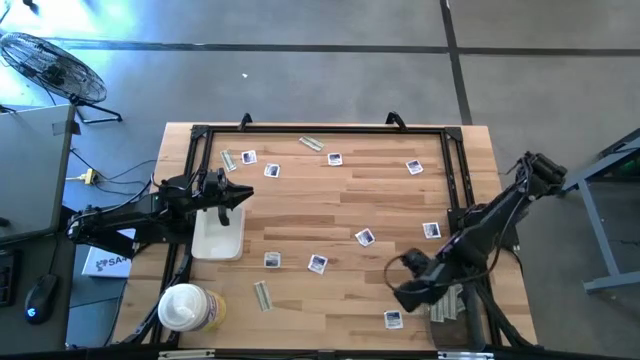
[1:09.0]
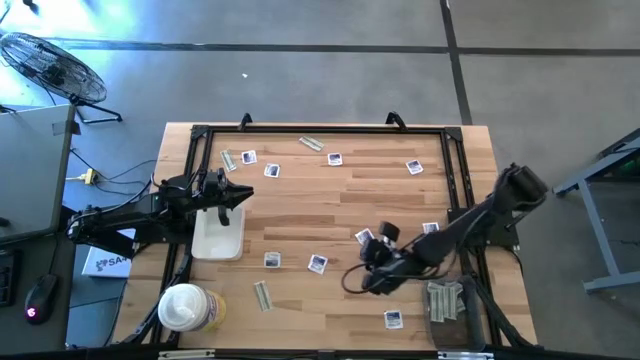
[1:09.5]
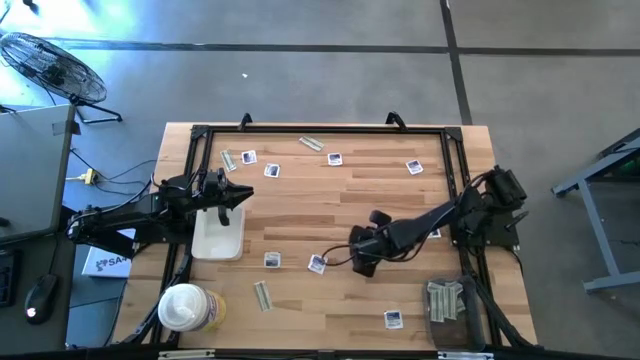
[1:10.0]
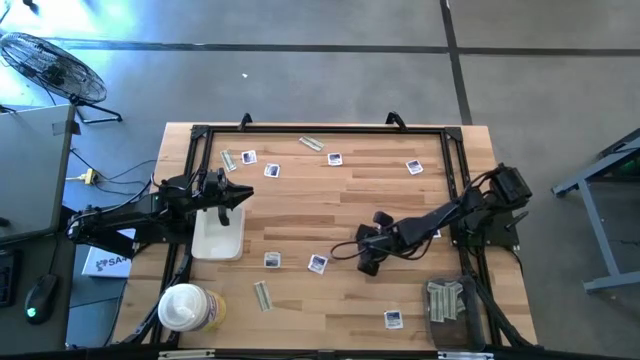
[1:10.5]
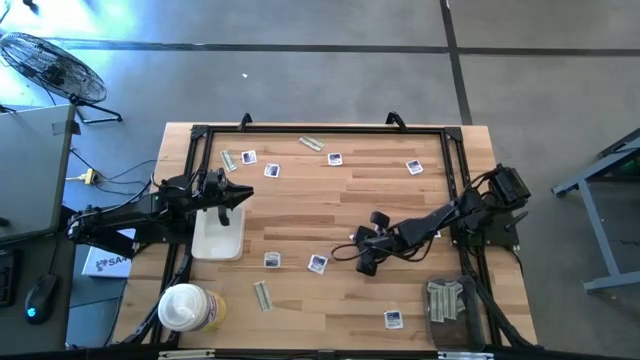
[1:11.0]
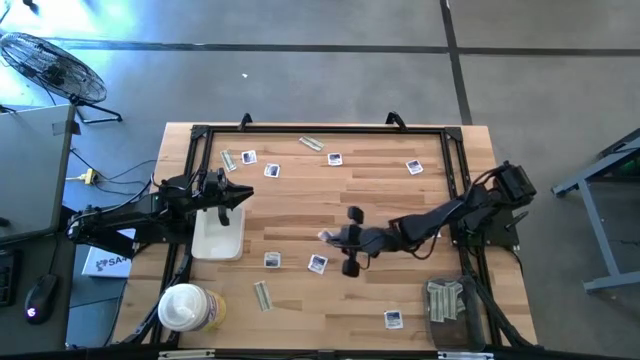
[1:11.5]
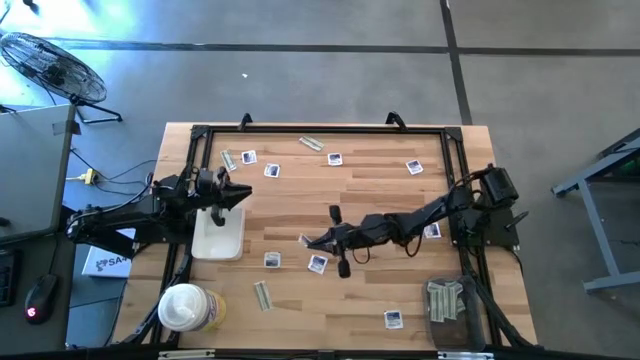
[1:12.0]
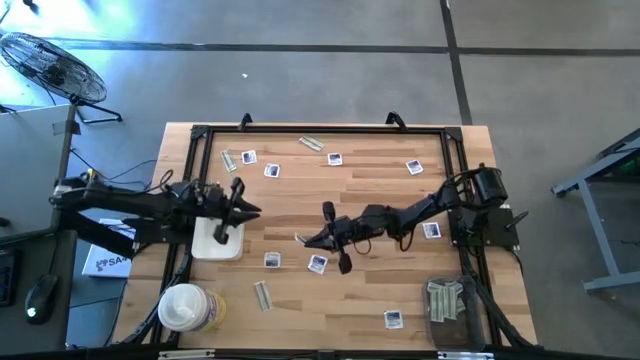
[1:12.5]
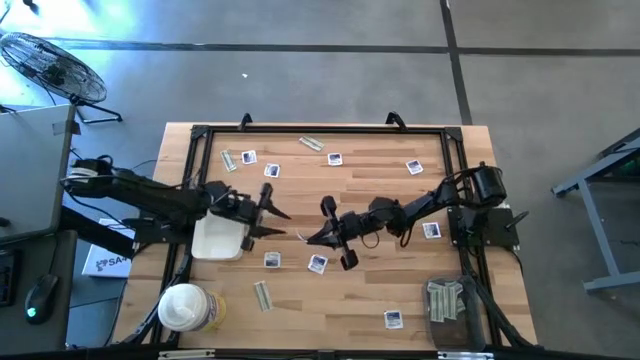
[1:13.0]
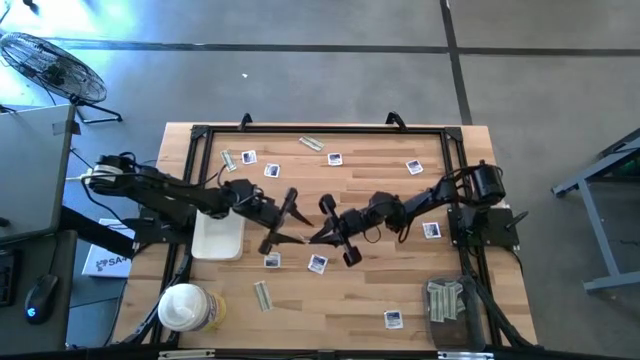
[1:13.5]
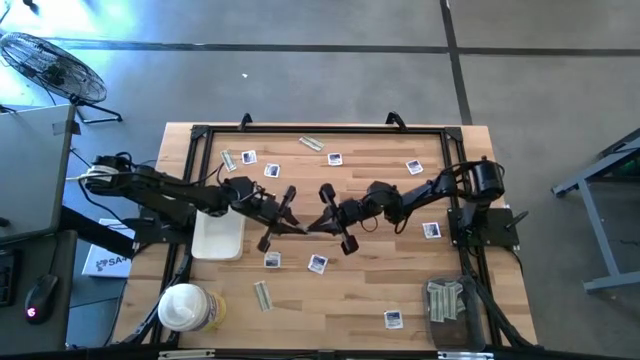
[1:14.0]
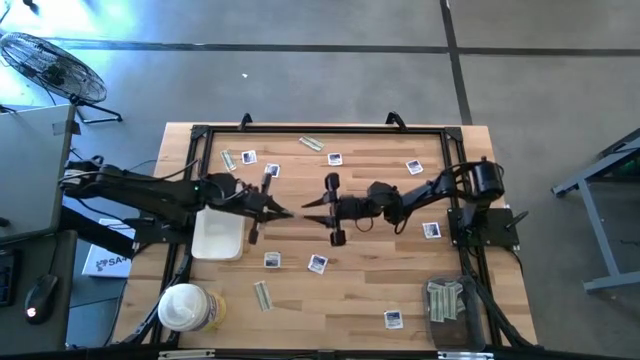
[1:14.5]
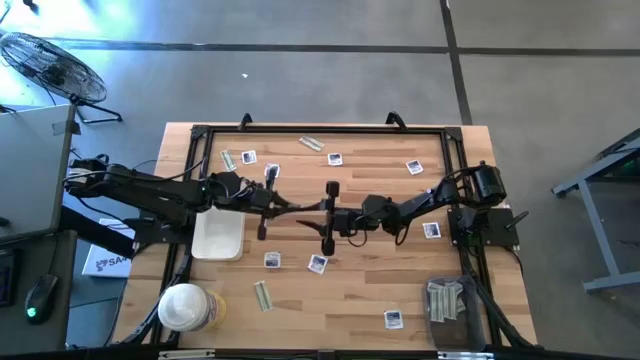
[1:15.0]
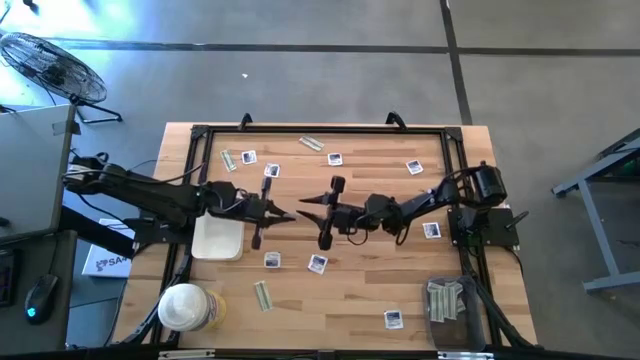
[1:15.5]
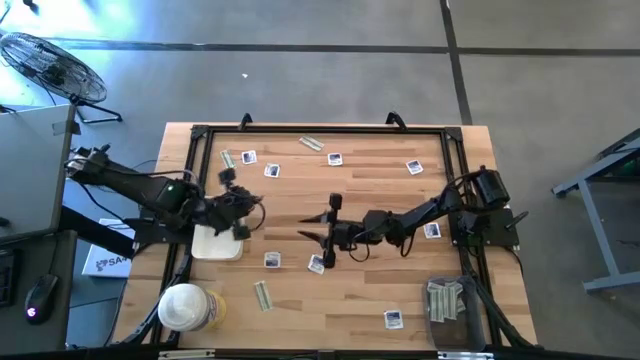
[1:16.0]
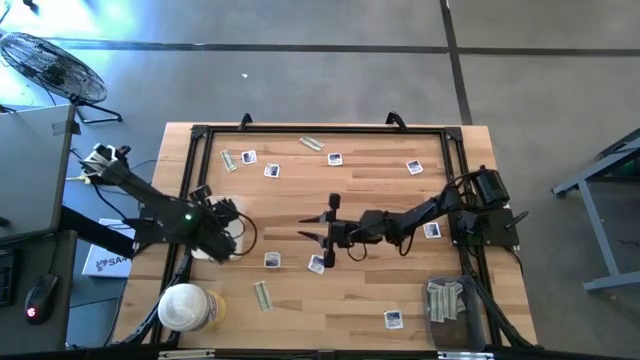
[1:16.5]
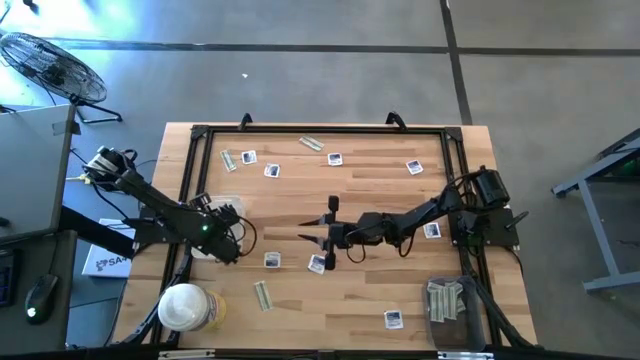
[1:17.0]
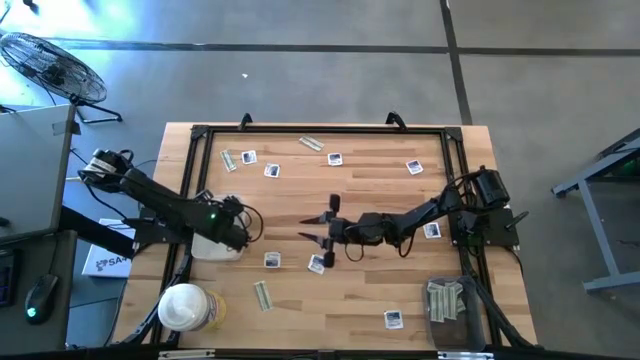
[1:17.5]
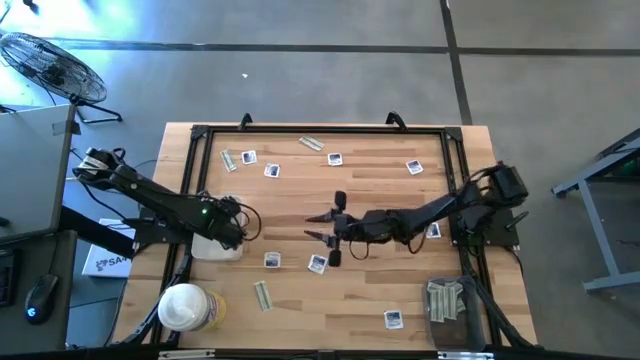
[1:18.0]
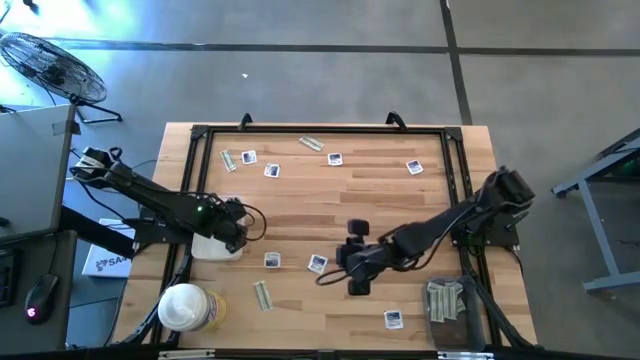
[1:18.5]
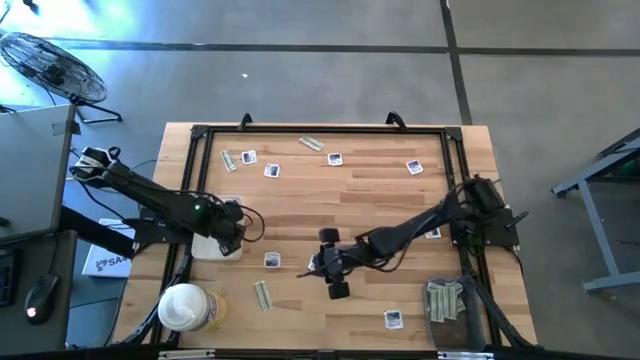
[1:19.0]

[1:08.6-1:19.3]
Task: Pick & Place First Aid Supplies
Put the blue alcohol pad into the white bin

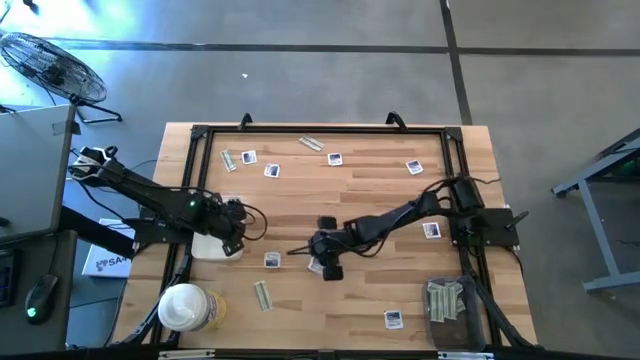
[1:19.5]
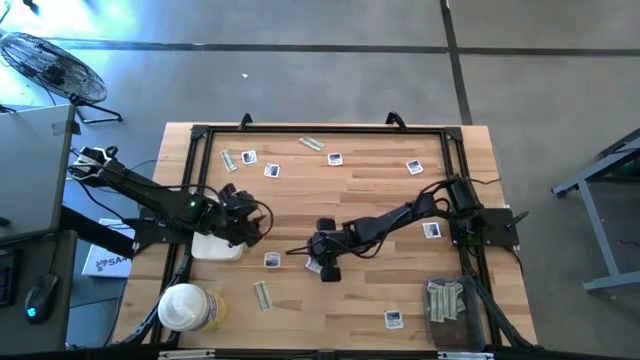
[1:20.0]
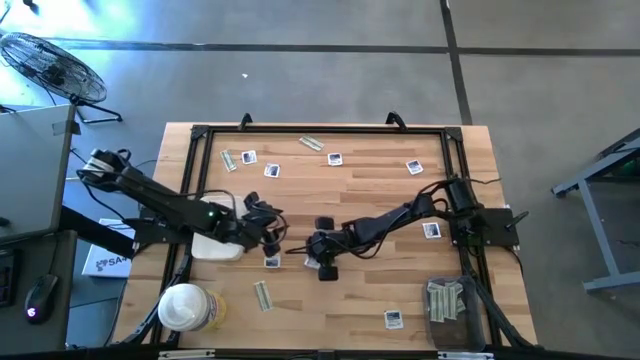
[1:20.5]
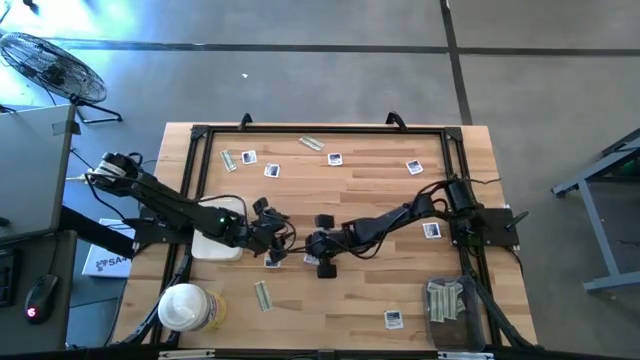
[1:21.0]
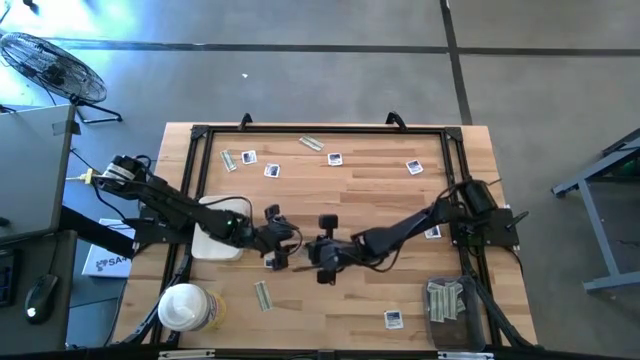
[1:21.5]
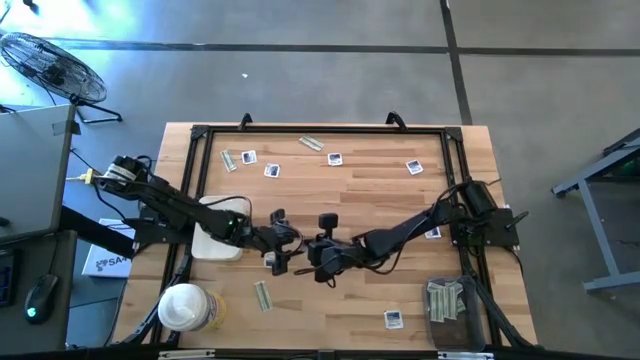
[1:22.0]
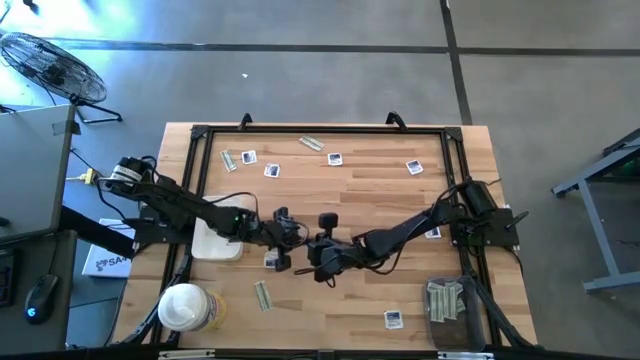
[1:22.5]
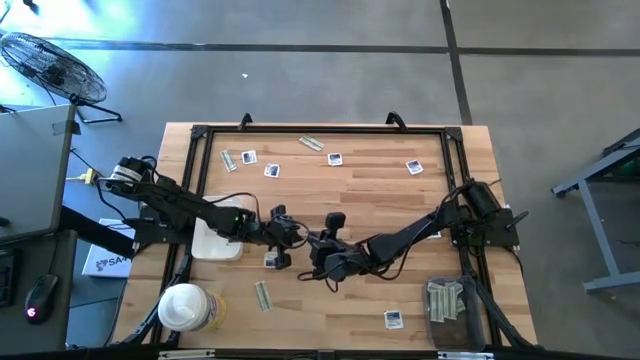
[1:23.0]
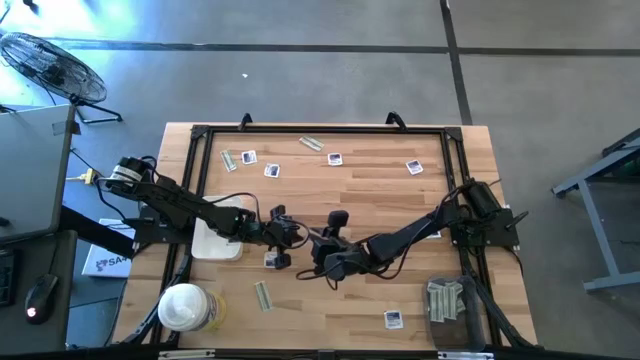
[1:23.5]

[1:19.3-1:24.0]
Put the blue alcohol pad into the white bin

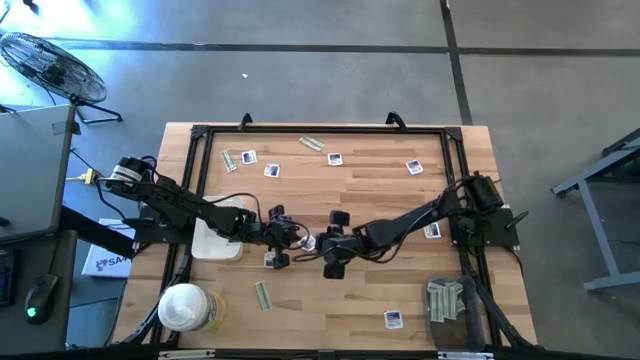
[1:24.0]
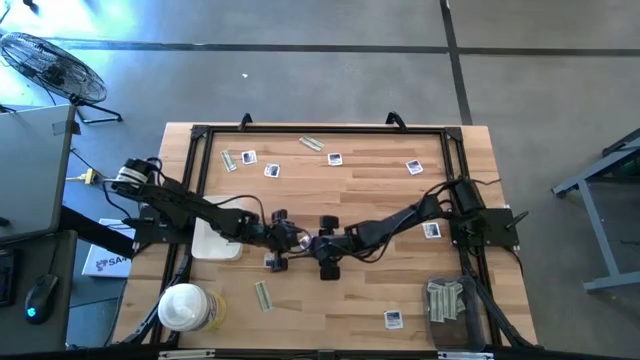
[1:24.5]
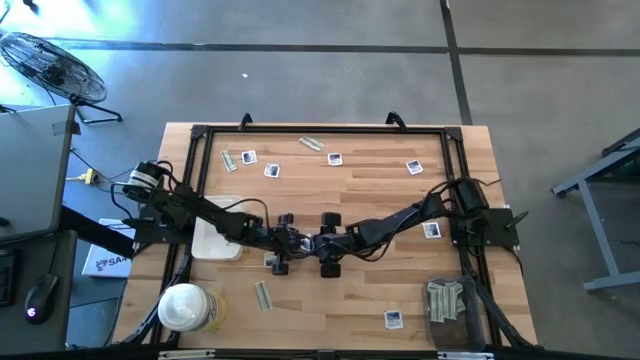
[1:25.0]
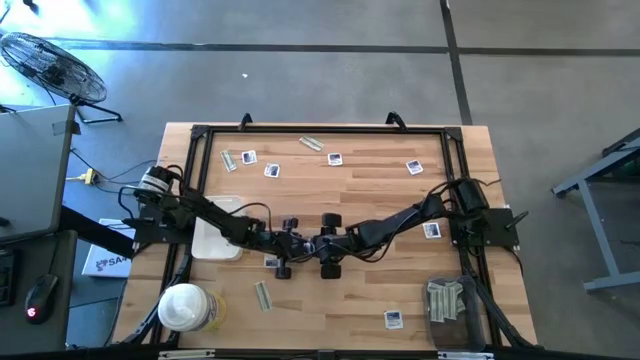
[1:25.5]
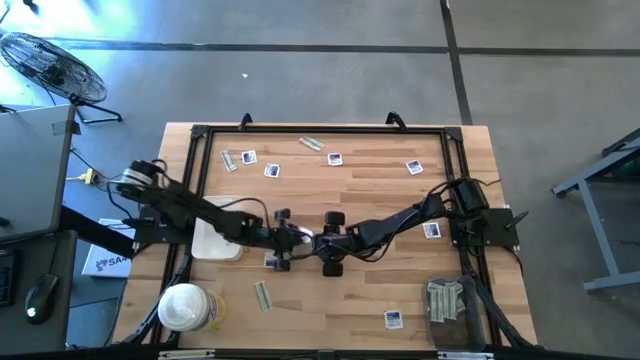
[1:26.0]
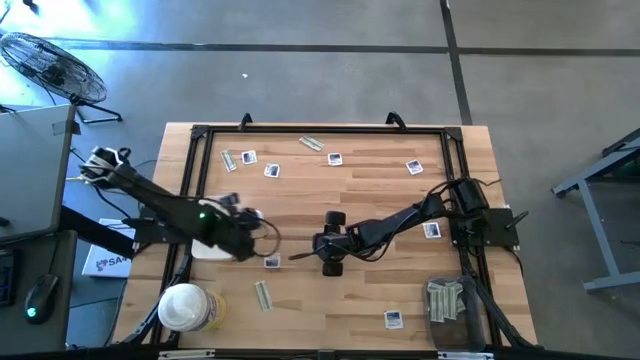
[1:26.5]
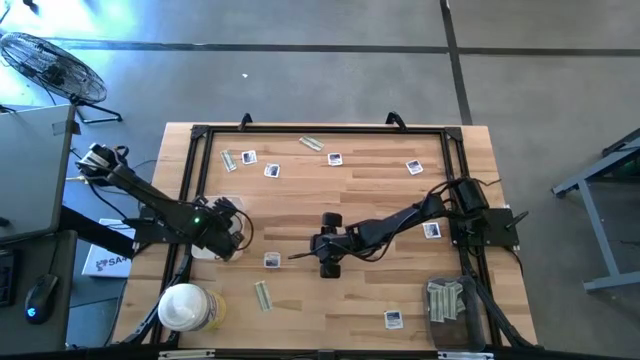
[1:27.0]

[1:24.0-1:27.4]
Put the blue alcohol pad into the white bin

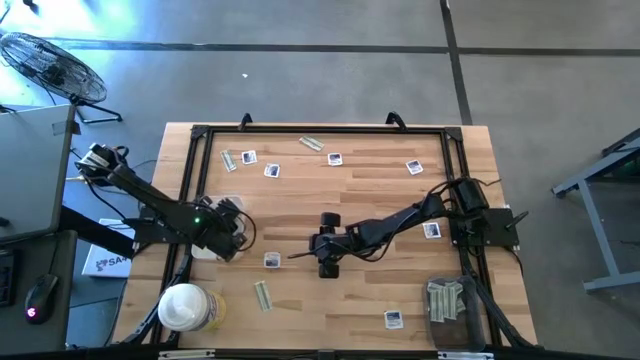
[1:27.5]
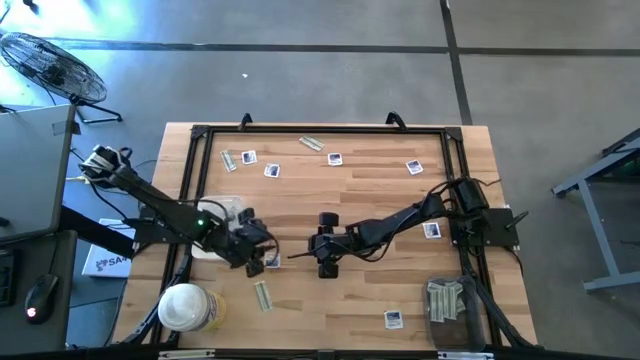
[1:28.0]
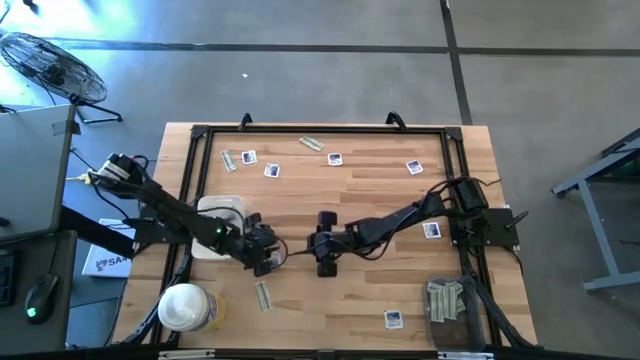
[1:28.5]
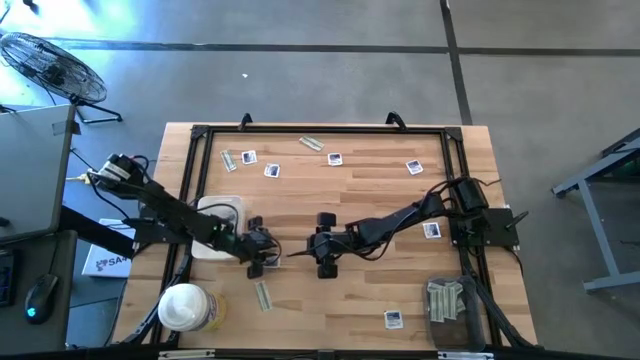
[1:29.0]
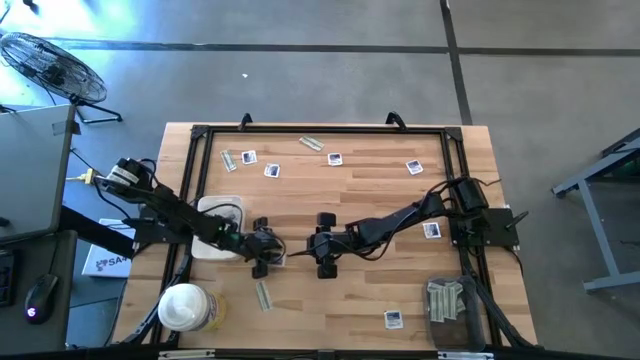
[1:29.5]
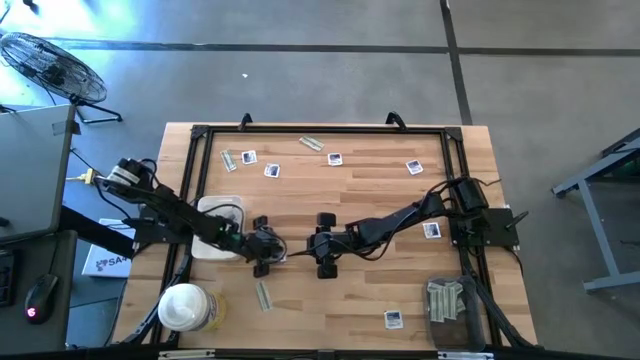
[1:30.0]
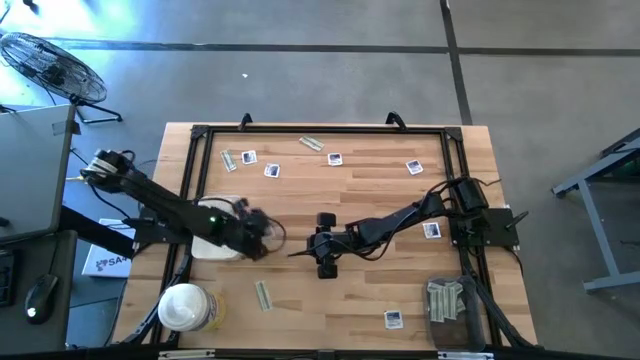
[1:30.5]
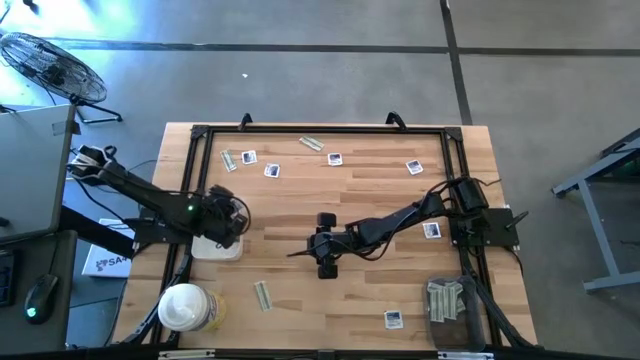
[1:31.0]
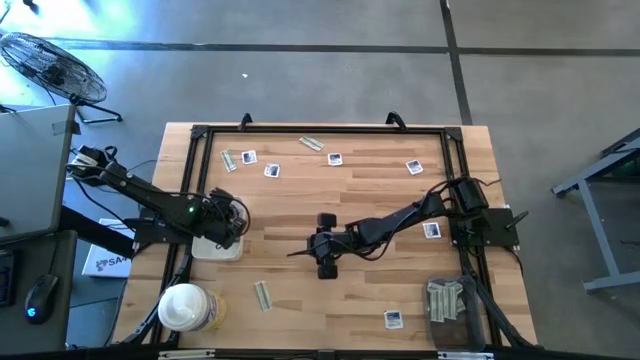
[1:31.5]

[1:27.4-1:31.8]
Put the blue alcohol pad into the white bin
